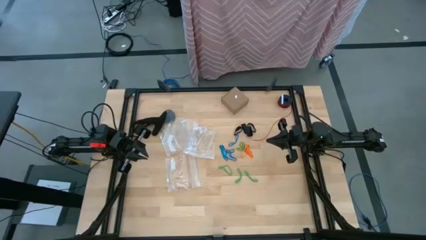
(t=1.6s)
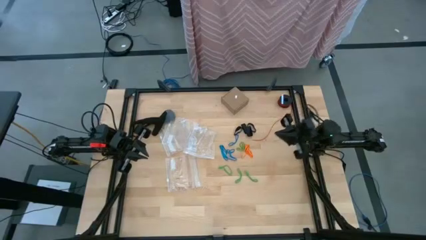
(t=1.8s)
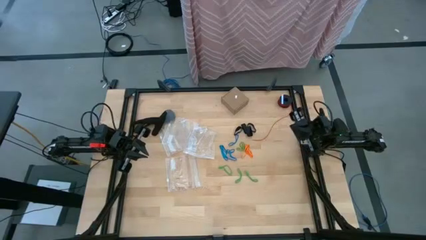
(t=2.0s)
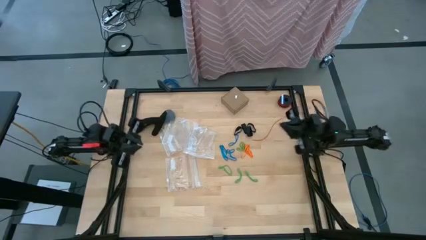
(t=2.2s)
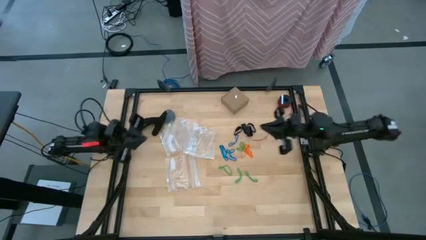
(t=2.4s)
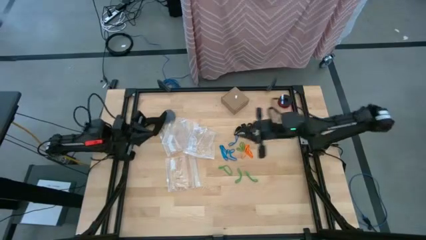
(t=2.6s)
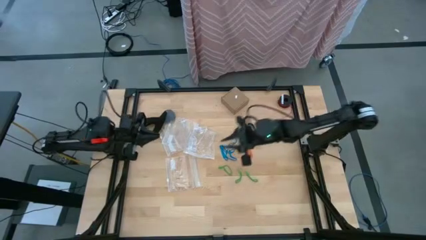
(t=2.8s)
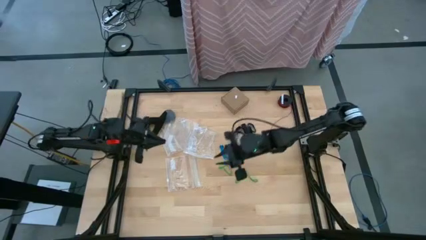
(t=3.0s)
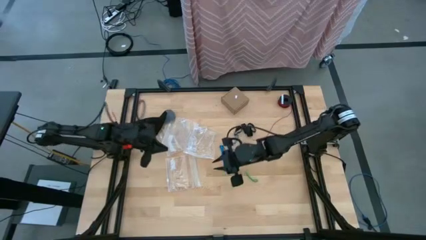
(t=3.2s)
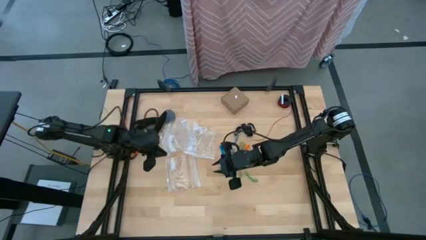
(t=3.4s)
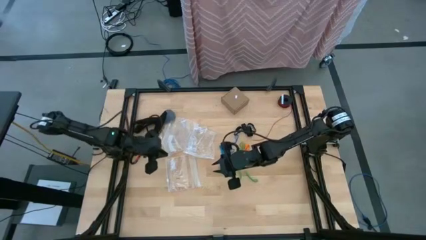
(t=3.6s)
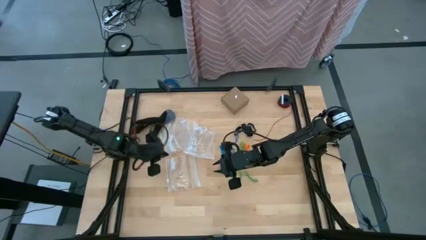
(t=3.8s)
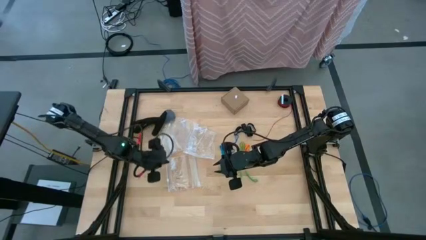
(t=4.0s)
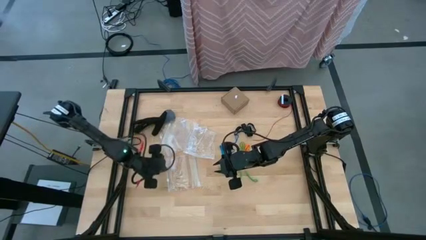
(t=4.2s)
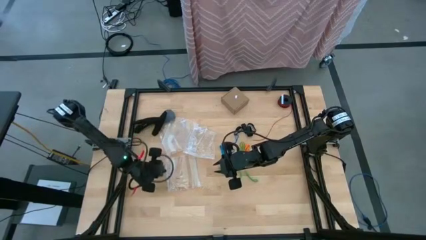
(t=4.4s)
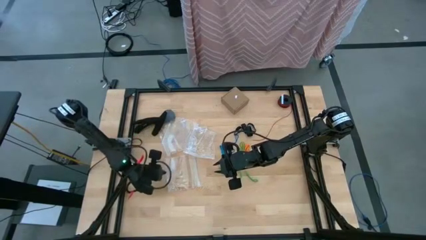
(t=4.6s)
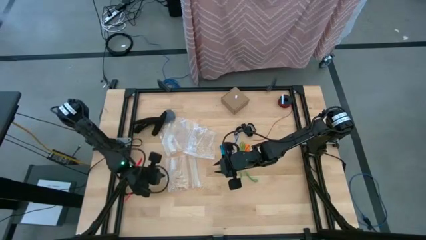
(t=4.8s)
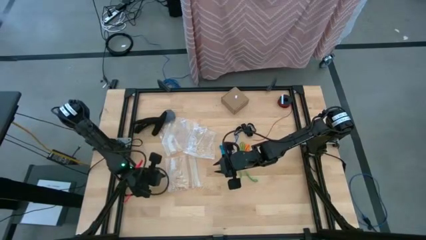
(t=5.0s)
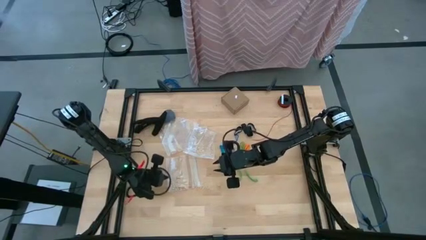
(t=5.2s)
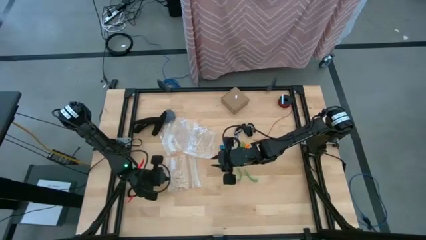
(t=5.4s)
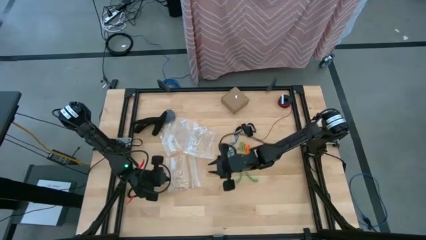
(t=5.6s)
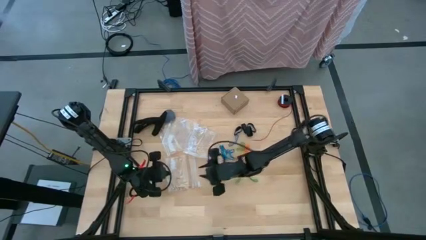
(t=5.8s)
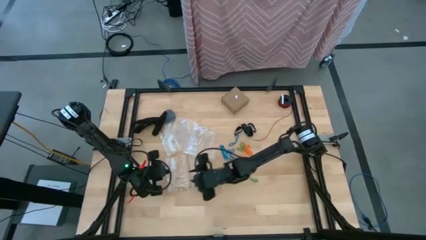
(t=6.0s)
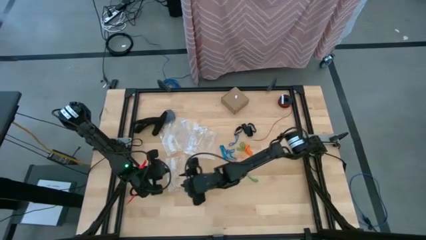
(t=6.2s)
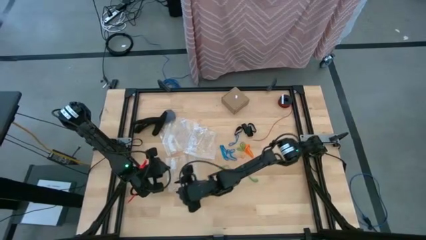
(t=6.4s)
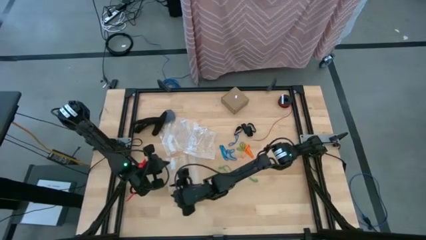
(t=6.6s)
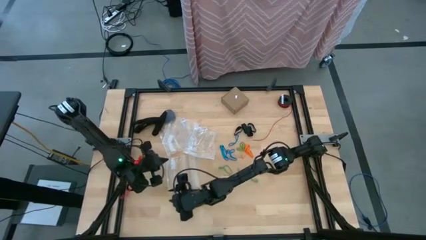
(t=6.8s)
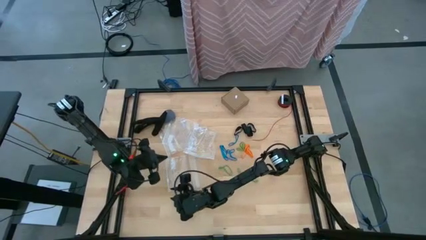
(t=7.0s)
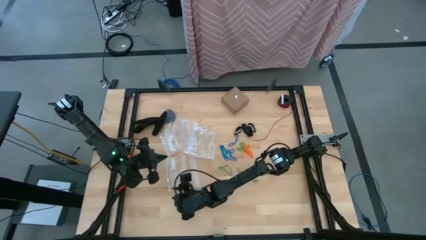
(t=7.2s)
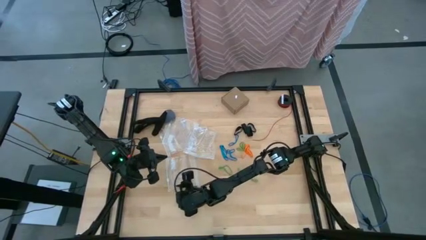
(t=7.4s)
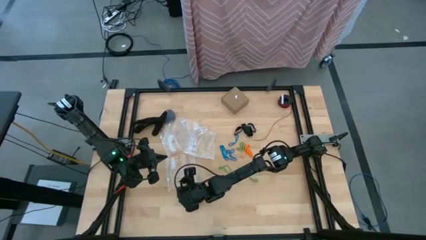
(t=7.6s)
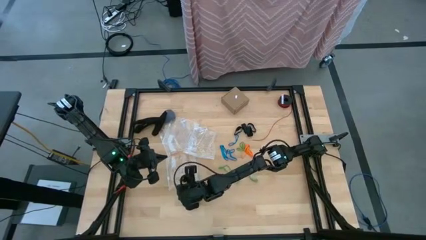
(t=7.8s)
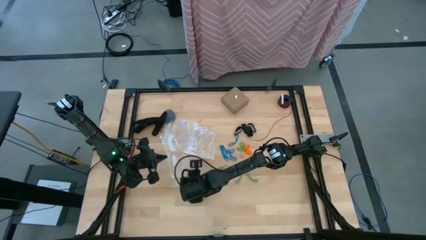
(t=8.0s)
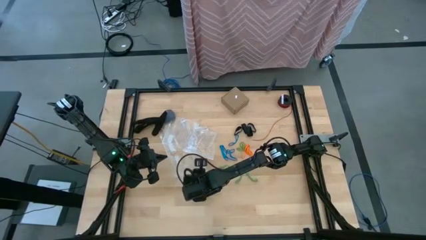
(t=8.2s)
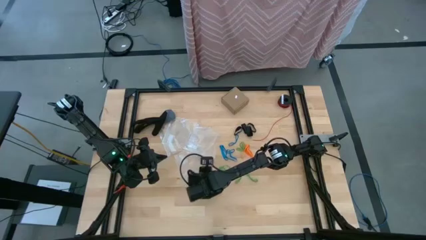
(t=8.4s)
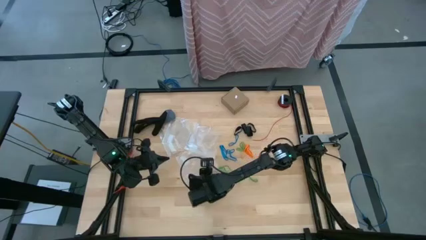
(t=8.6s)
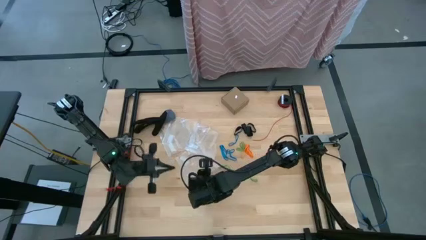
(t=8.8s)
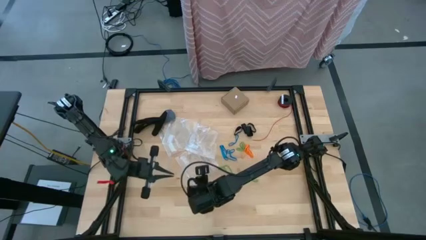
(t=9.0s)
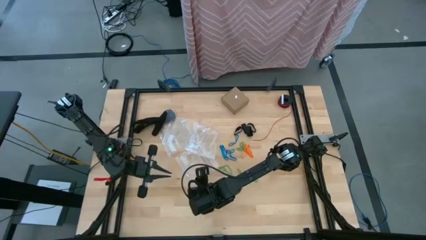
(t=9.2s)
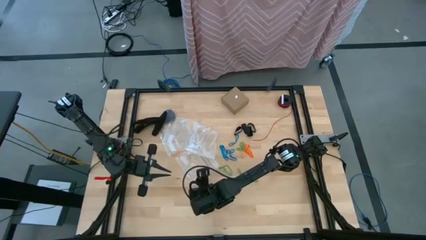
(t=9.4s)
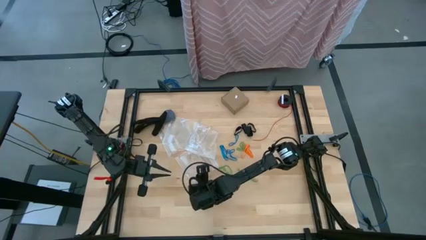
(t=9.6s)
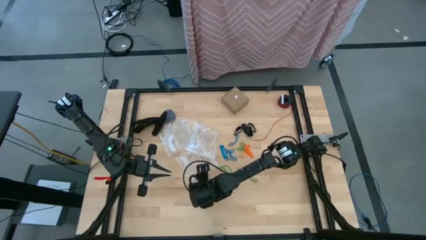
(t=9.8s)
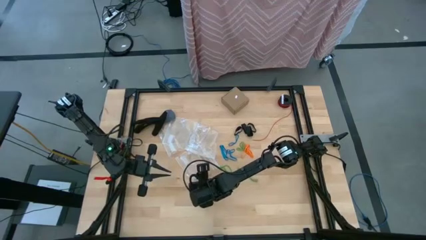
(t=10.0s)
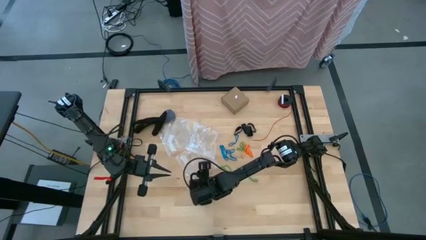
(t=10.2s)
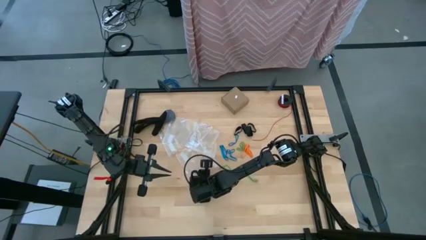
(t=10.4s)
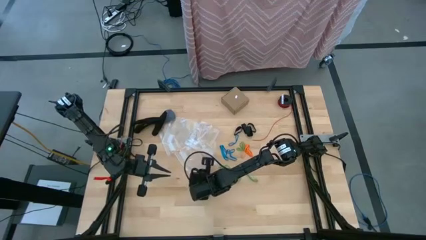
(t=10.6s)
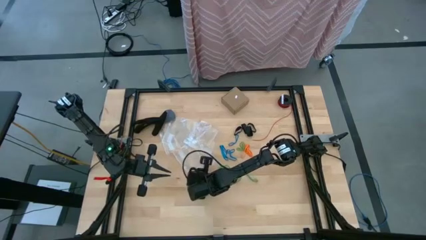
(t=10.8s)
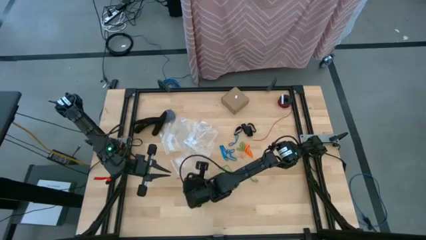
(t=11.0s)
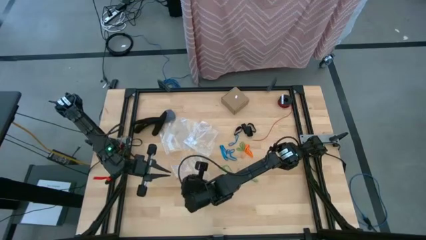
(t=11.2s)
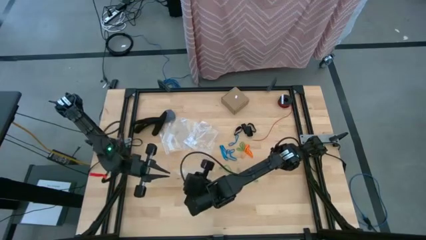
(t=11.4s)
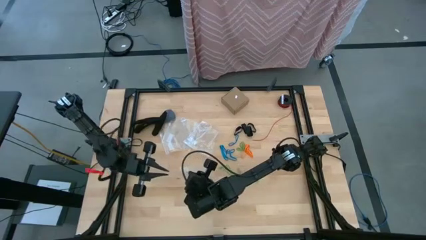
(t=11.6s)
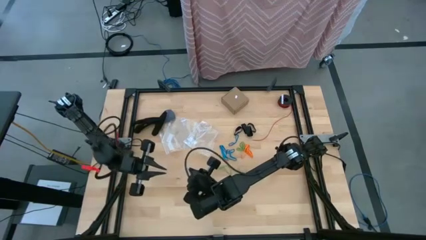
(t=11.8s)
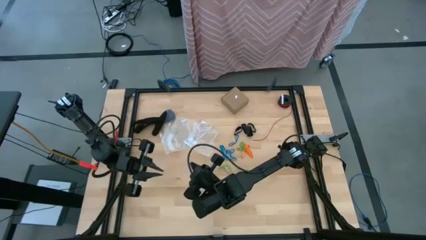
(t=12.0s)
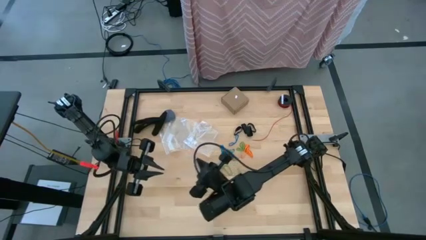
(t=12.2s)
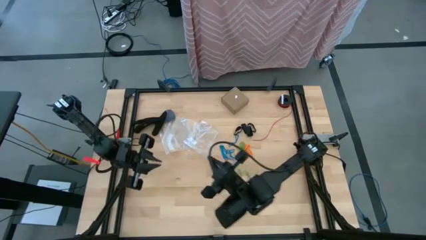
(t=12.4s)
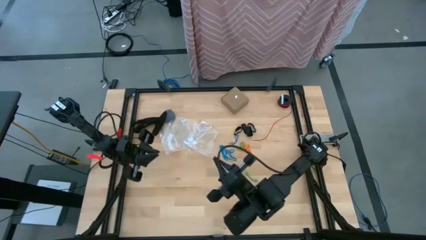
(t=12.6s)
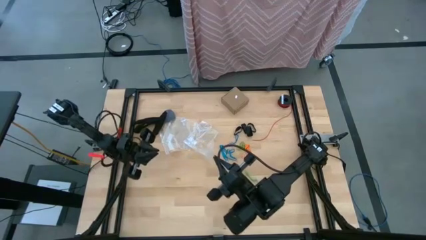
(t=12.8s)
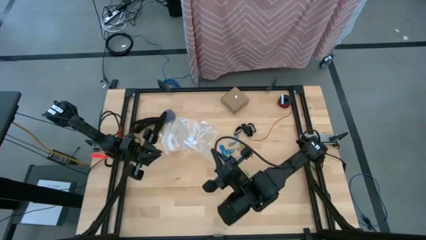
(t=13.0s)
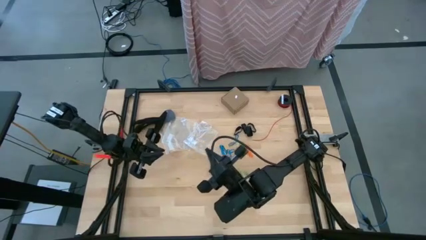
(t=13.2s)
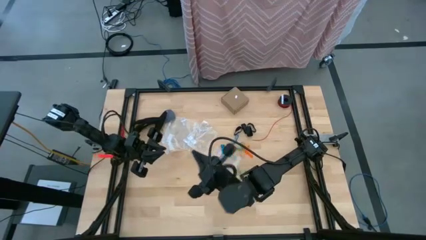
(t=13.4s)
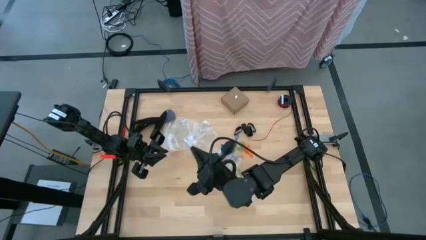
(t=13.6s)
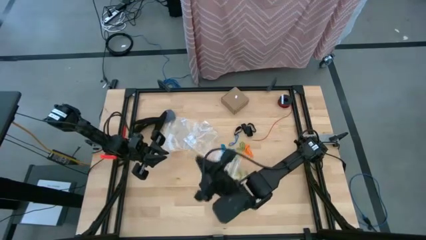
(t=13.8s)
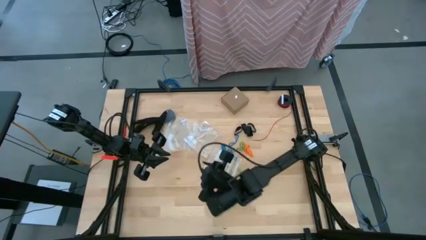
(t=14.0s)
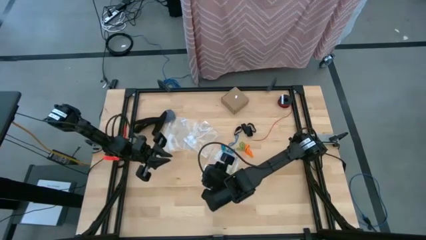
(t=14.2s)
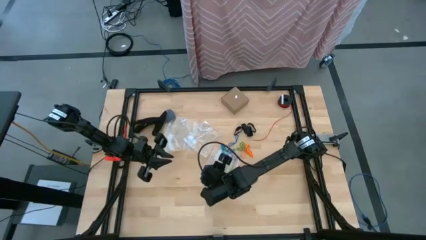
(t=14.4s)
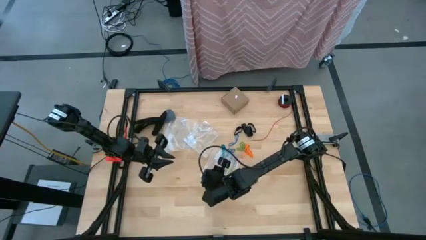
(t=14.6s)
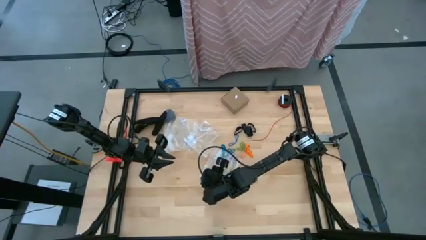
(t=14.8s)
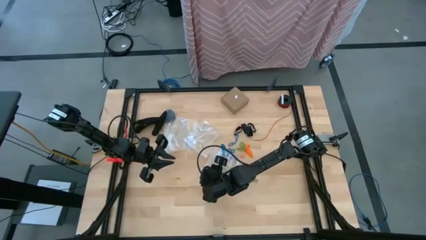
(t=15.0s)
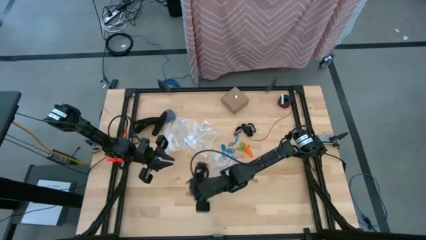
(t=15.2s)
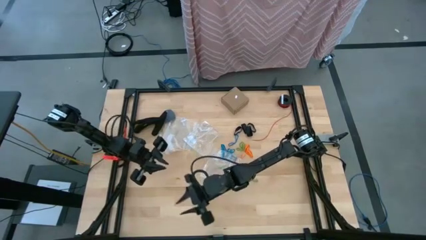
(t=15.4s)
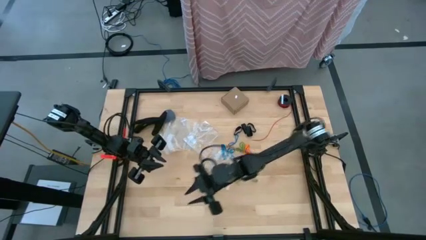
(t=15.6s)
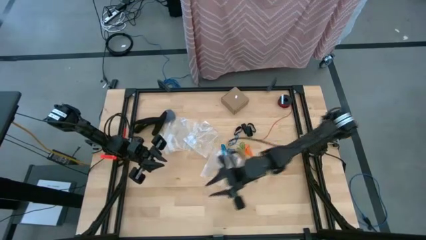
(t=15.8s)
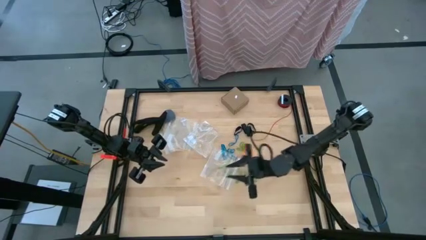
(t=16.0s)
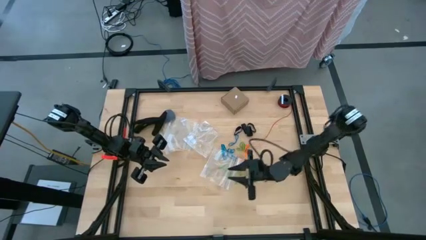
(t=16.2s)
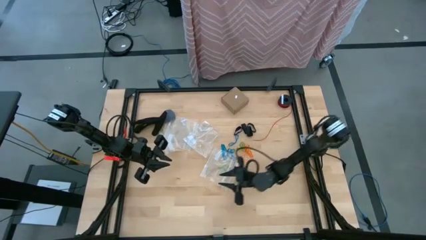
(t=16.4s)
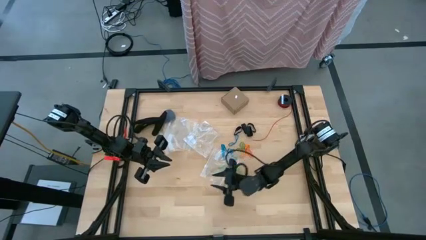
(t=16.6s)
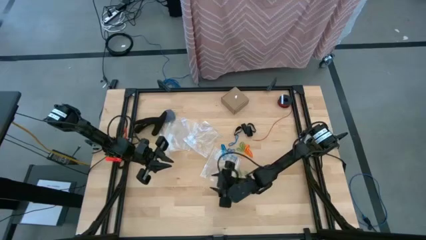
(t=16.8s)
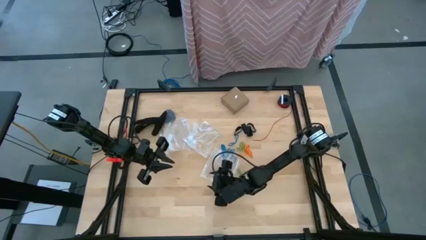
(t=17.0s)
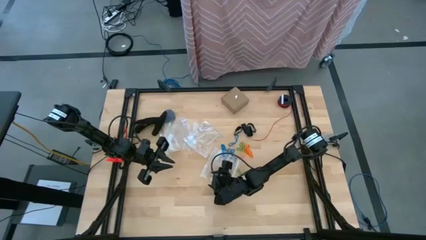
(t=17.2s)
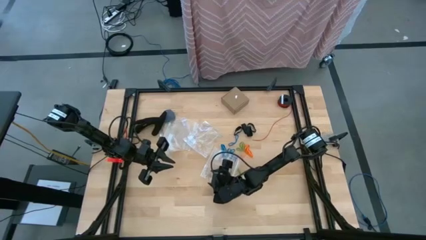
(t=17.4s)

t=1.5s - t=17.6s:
Task: Sort rubber bands
Open the transparent zip bag
